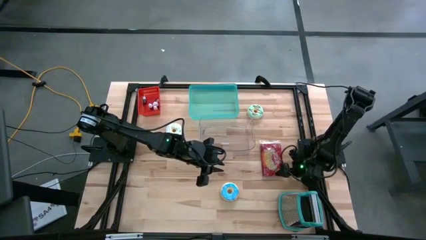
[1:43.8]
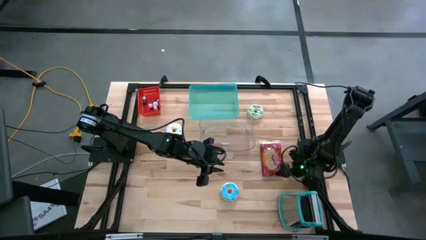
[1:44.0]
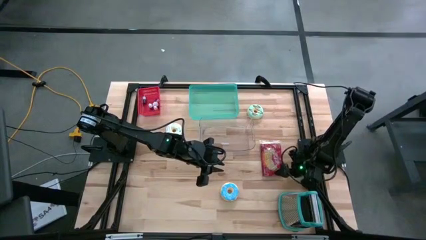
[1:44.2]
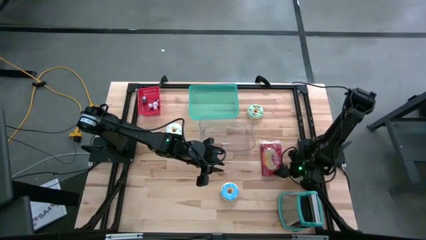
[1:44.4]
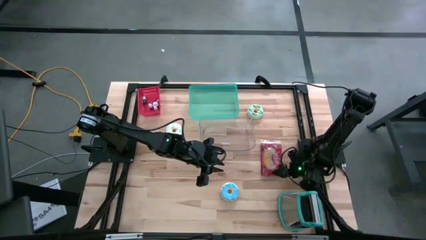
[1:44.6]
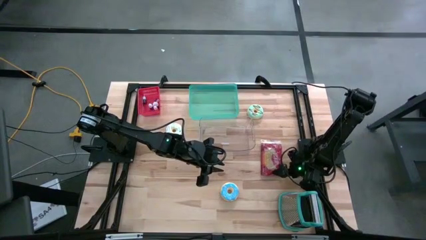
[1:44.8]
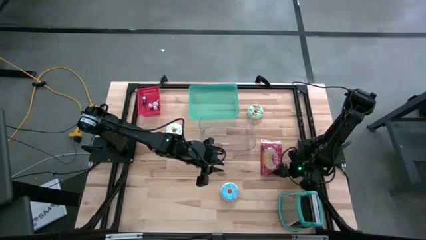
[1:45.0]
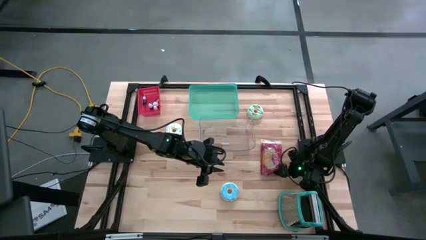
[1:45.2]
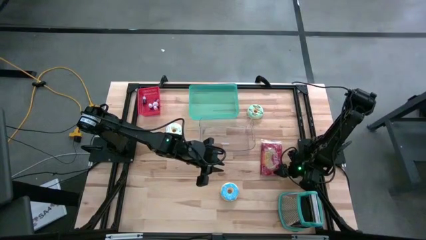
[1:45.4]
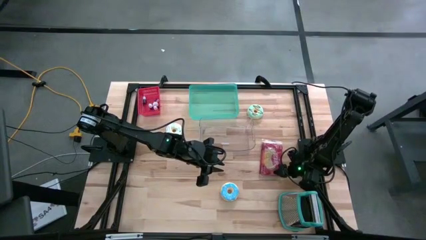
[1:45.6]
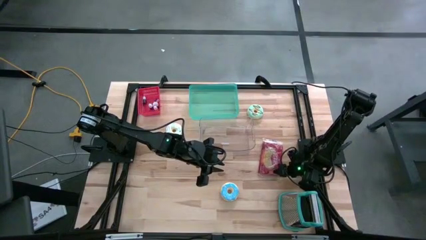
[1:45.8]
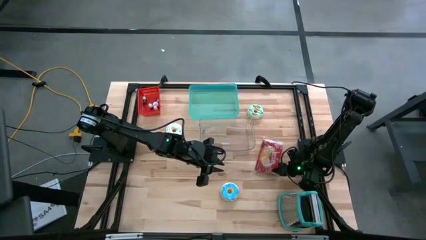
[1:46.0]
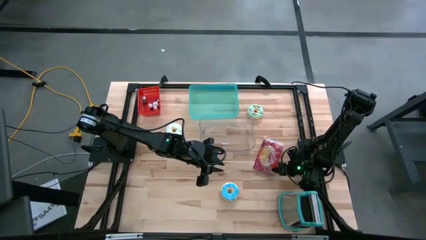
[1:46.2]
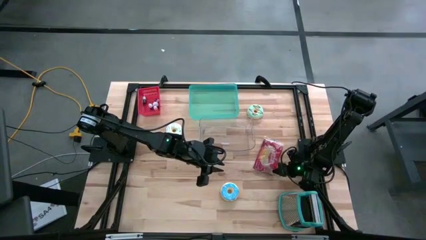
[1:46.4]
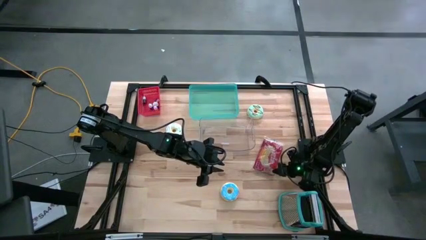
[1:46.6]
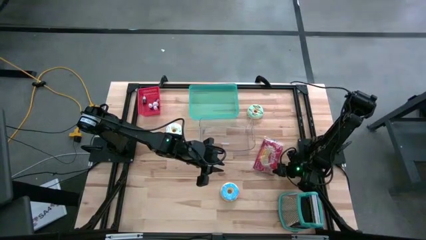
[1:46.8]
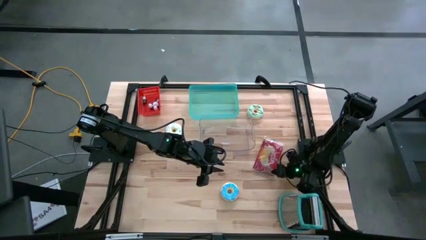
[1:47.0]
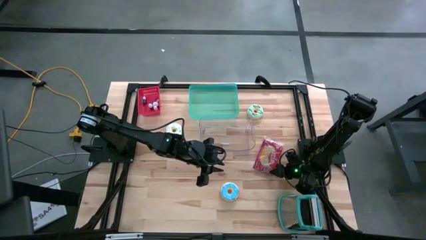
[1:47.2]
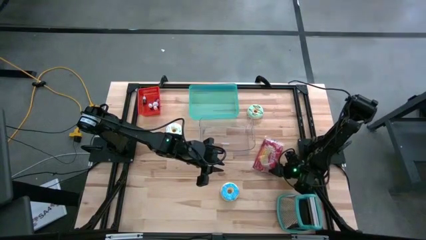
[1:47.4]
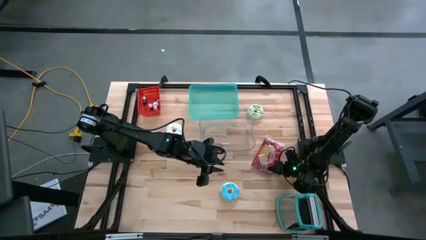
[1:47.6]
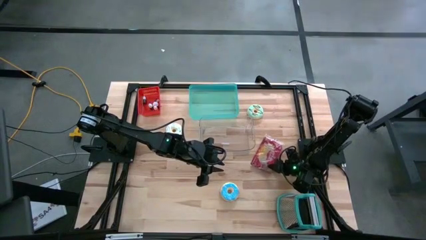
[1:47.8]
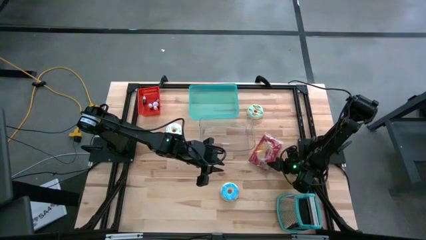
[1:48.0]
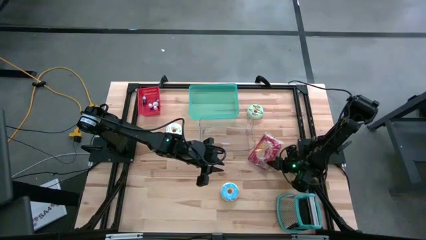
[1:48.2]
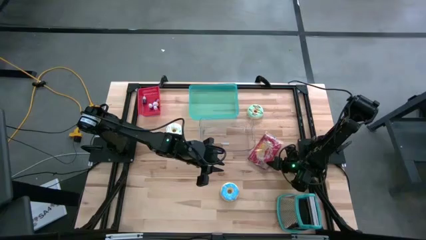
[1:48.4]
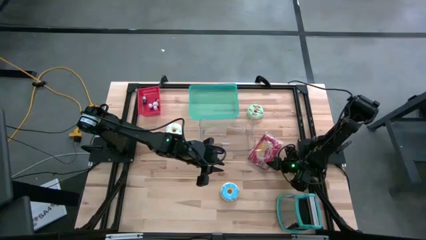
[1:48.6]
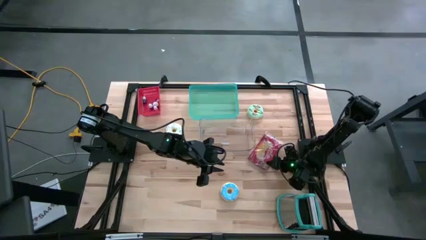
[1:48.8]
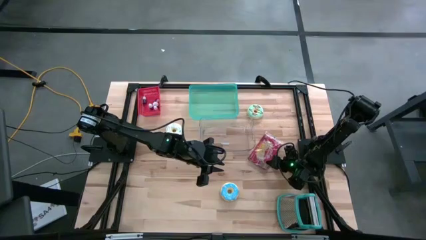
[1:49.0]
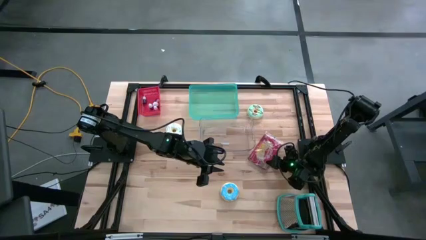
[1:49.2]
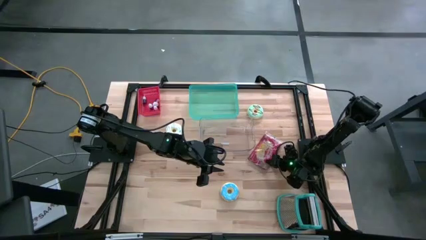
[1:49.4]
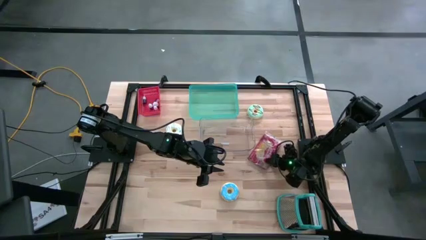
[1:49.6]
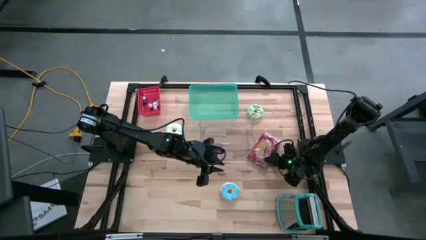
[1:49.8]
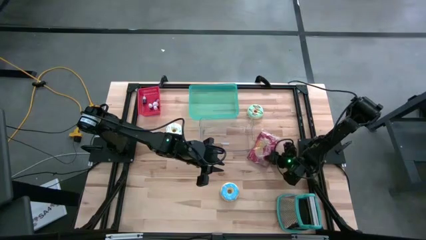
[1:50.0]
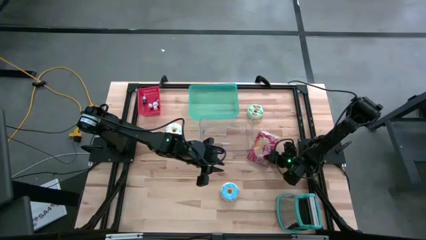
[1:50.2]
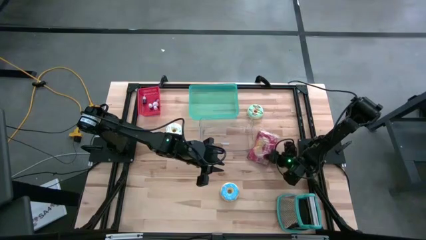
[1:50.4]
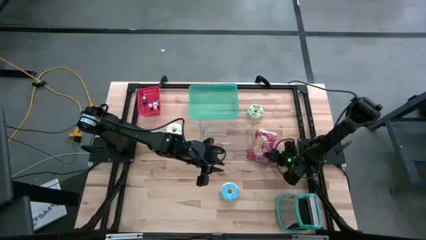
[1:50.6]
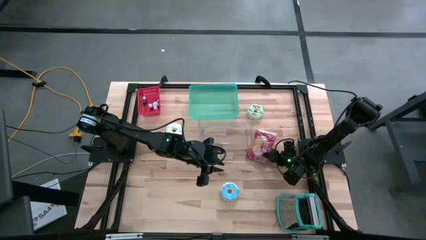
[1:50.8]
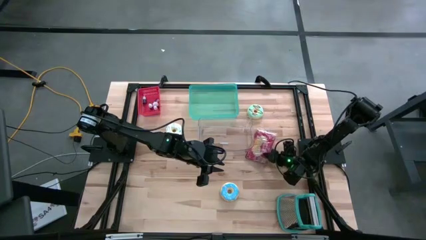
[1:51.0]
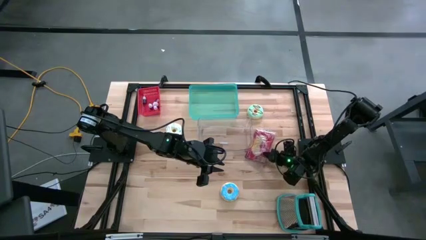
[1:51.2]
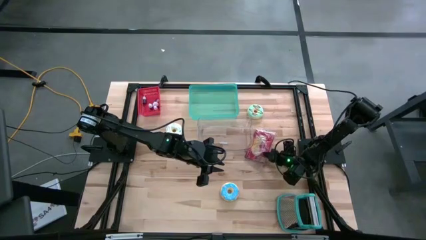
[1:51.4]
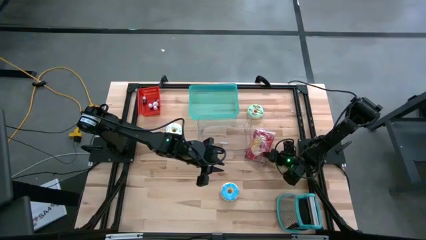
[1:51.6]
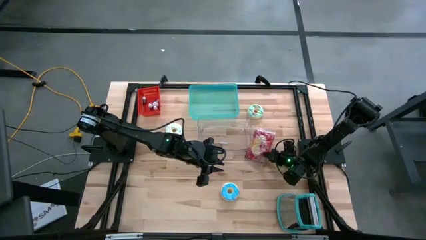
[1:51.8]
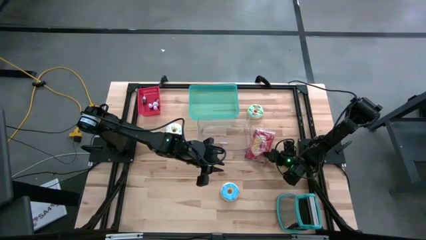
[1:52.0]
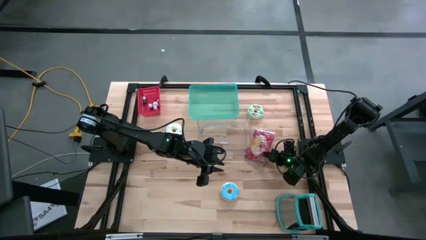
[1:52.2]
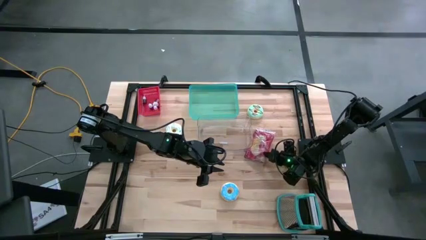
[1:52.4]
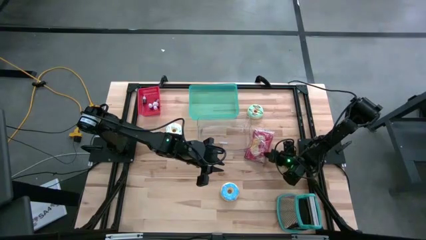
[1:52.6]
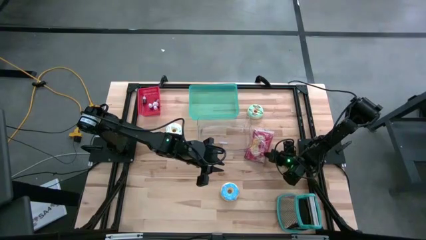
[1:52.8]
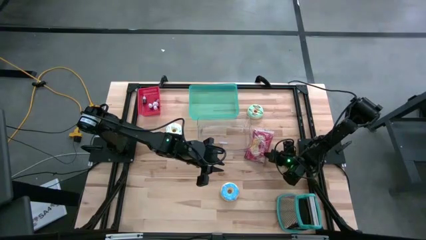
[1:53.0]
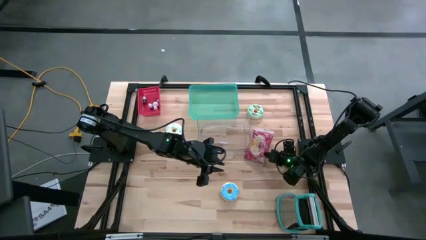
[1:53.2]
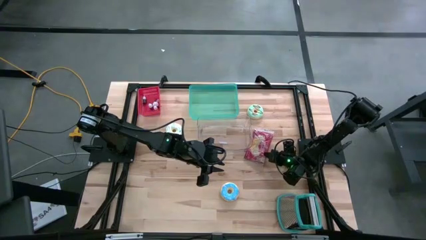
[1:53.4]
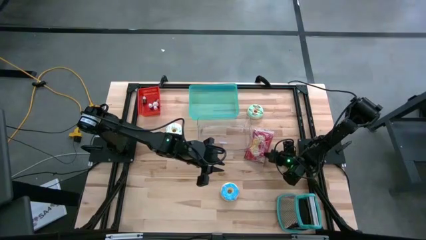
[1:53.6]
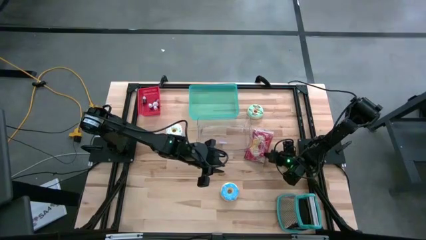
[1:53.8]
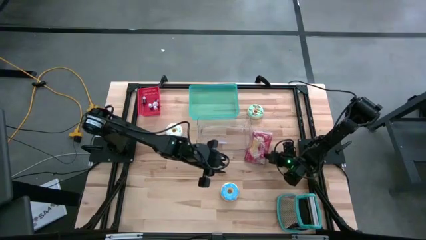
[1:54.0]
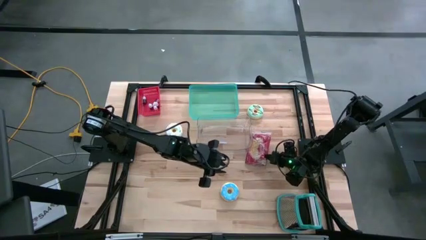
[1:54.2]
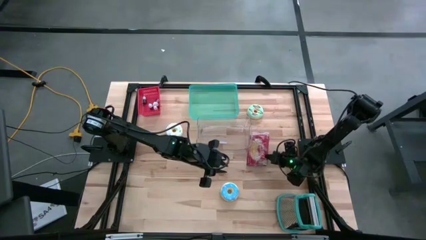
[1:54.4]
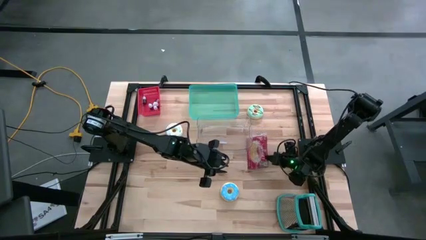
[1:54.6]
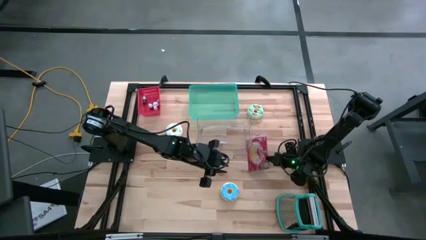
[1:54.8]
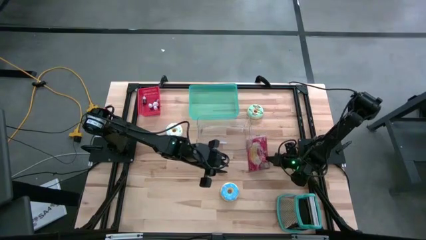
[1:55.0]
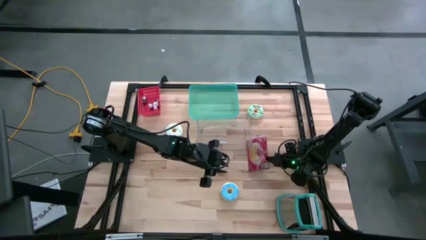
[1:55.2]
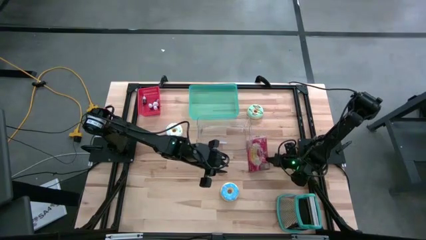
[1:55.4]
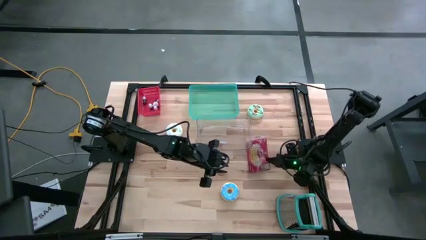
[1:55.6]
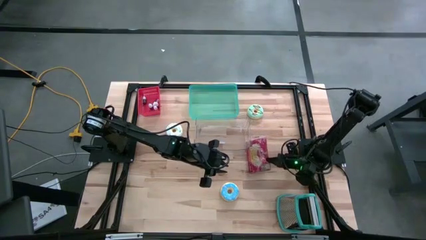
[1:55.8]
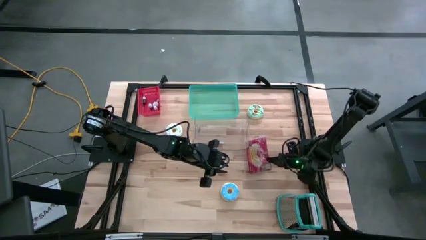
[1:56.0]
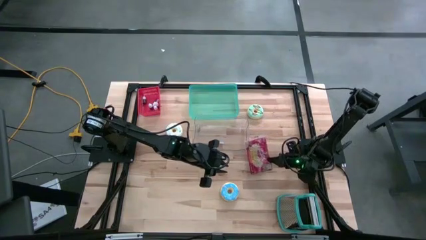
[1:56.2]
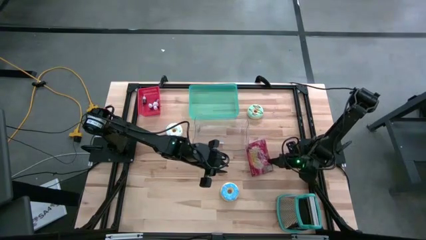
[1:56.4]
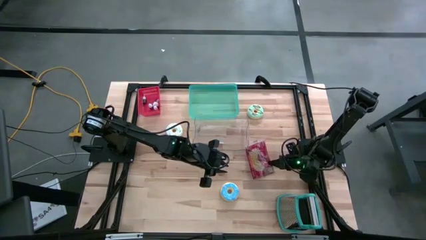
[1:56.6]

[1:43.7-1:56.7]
Put the popcorn bag into the blue bin
